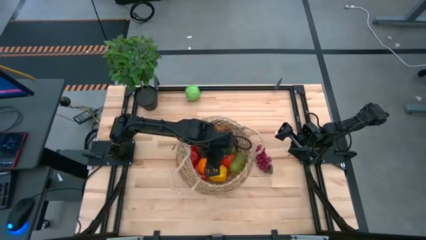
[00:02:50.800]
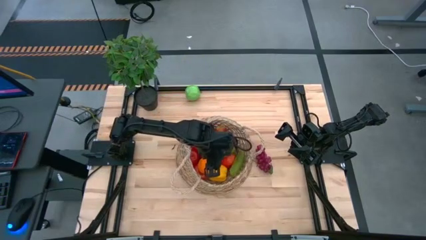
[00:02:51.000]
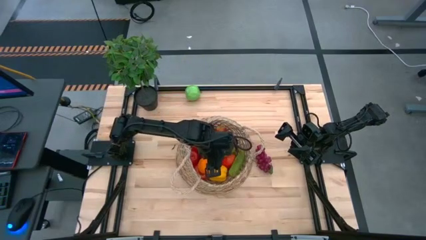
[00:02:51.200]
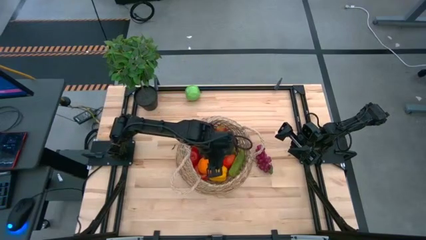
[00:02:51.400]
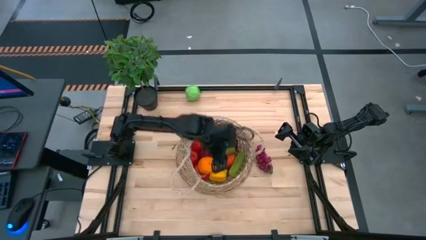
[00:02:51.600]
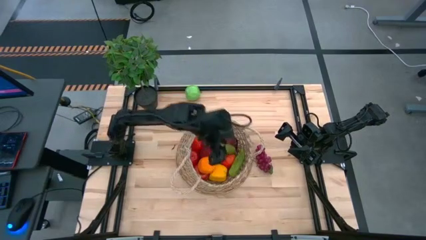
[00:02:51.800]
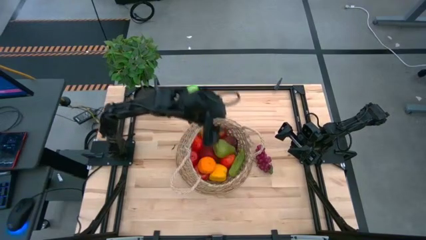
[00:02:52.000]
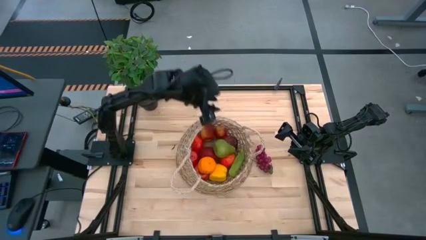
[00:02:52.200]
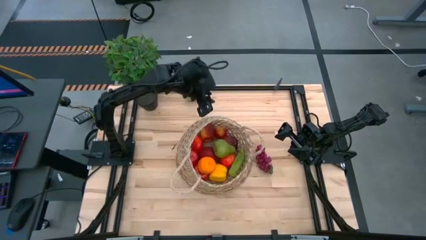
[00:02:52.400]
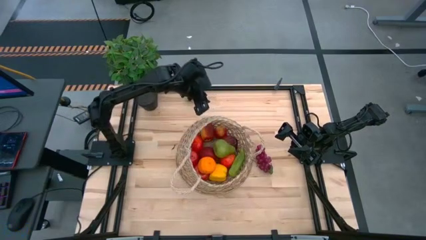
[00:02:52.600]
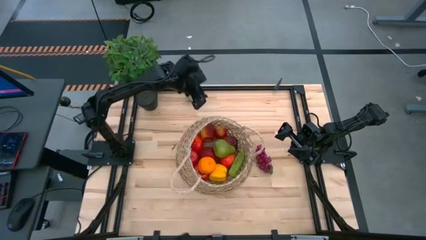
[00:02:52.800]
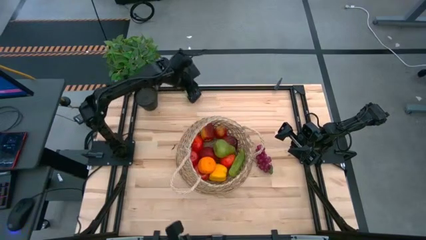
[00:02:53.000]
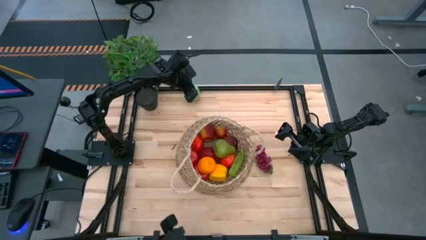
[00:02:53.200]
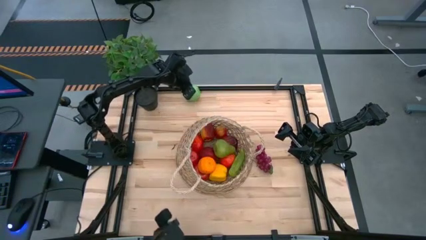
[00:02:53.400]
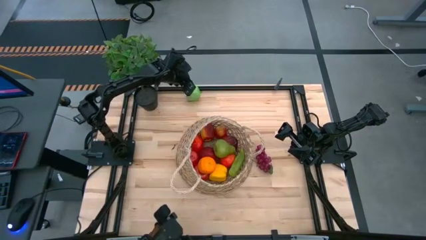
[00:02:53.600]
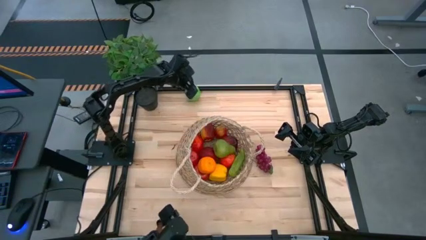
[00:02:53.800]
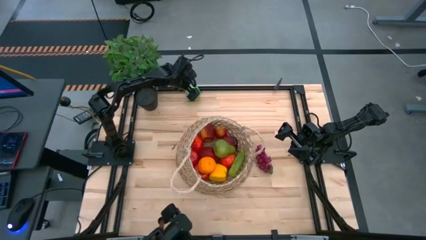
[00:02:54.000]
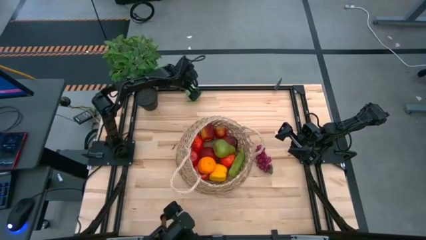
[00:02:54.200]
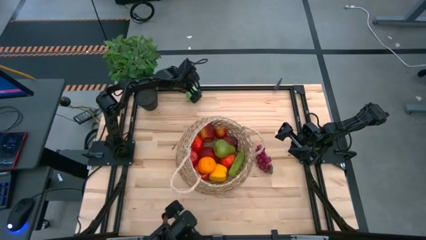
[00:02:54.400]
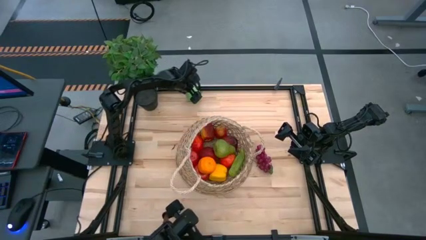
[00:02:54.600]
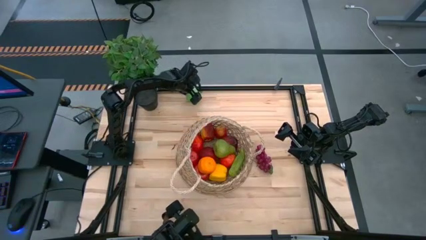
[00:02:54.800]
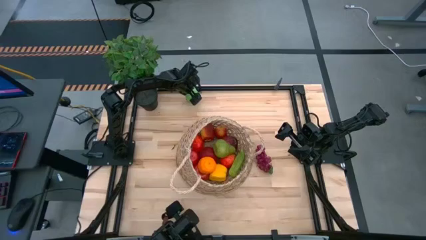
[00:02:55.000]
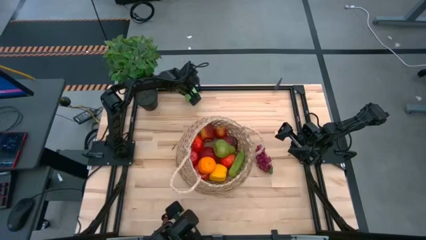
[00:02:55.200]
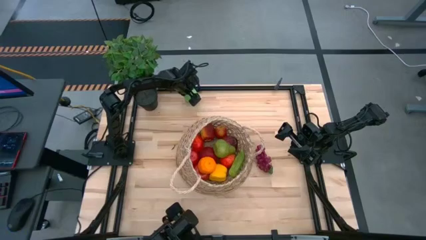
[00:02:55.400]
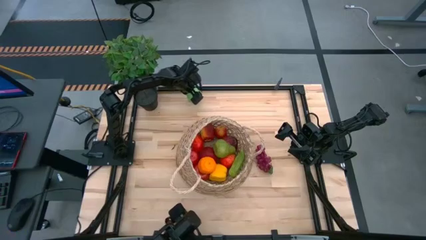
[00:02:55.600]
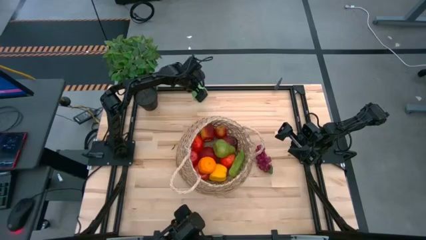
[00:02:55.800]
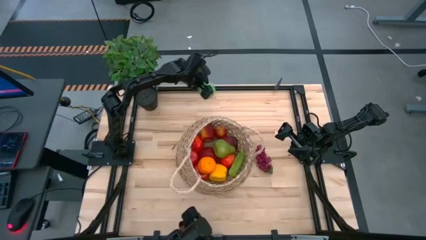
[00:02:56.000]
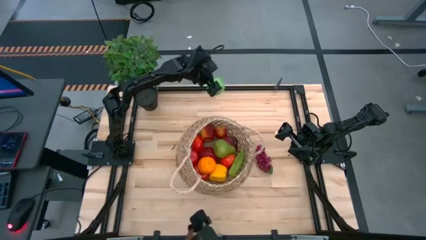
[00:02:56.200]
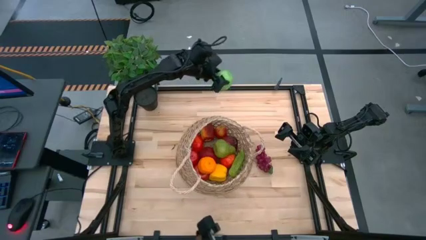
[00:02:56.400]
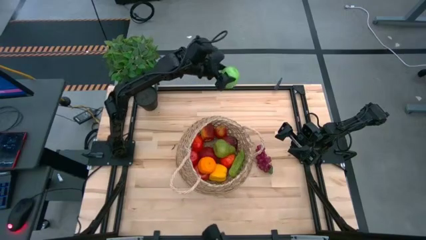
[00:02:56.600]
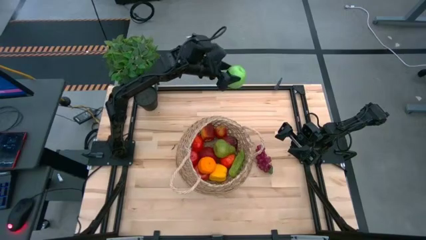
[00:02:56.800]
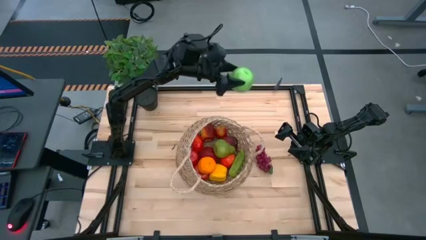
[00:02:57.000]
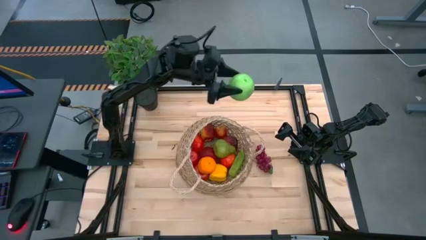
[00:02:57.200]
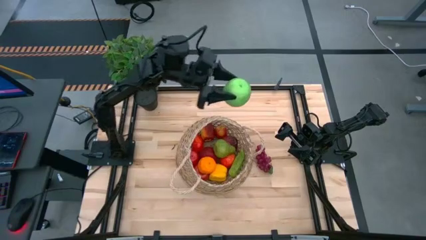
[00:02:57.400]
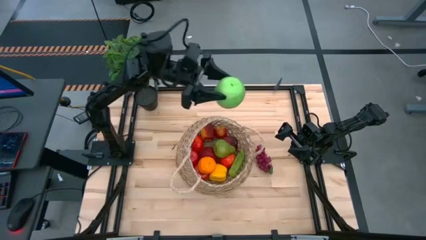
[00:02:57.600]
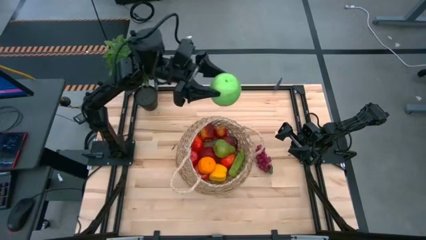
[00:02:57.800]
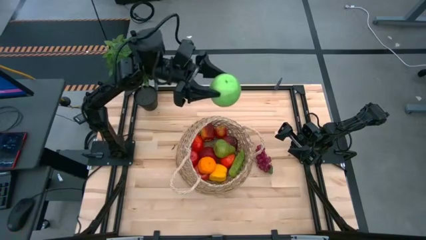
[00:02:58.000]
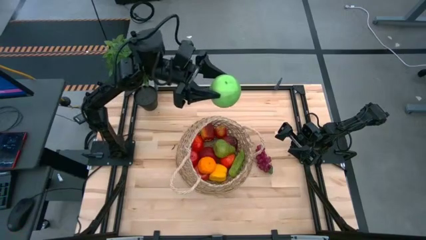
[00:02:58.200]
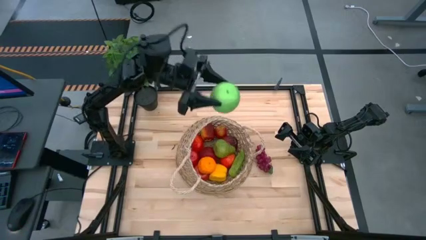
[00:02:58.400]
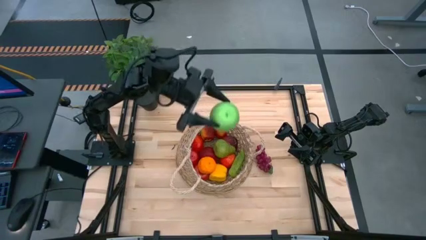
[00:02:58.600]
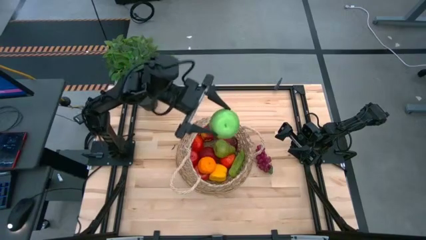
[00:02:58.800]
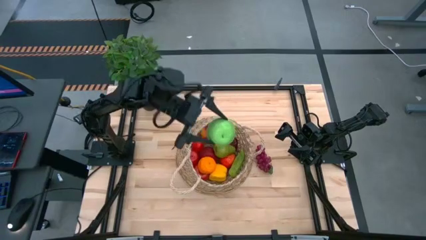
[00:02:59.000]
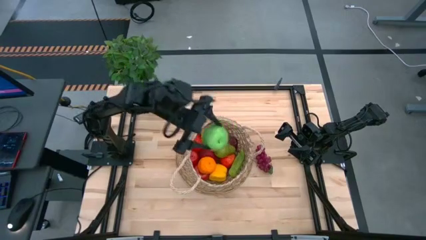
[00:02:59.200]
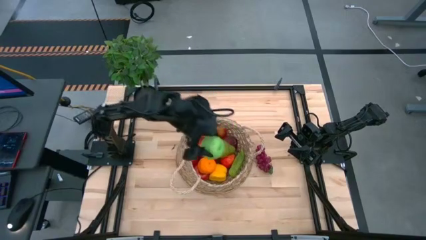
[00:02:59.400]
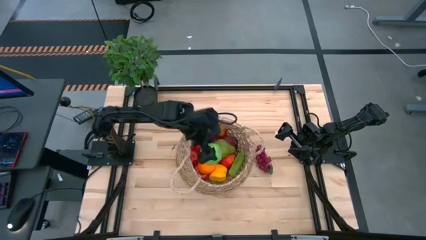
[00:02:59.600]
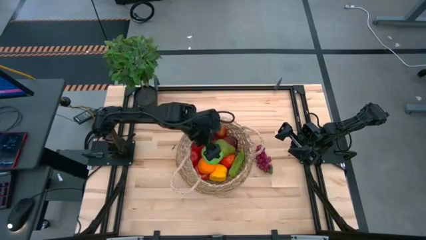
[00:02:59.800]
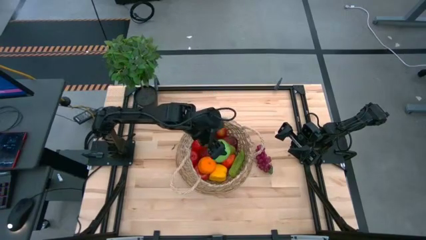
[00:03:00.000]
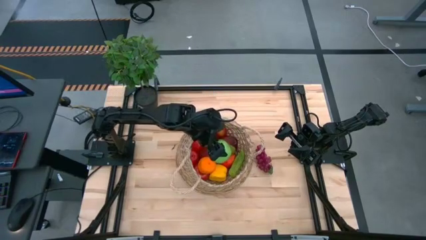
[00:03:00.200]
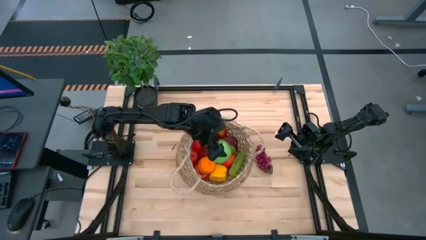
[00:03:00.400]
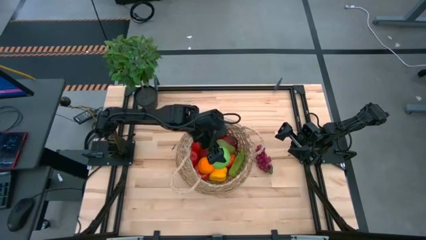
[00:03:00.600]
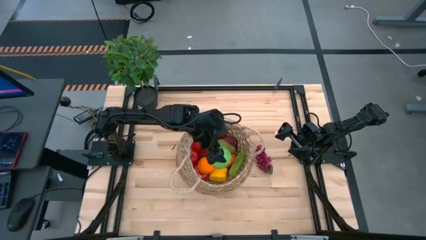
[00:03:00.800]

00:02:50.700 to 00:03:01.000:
Task: Build produce basket
Put the green apple into the woven basket

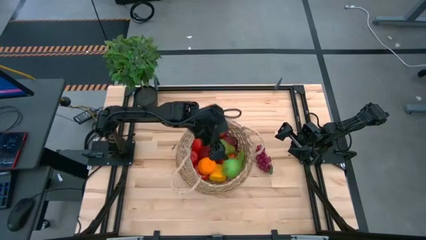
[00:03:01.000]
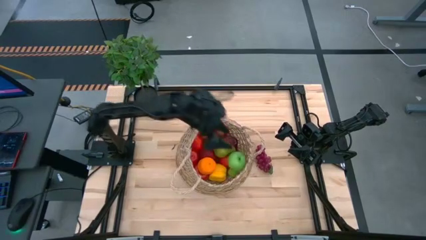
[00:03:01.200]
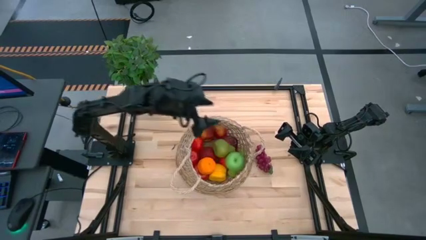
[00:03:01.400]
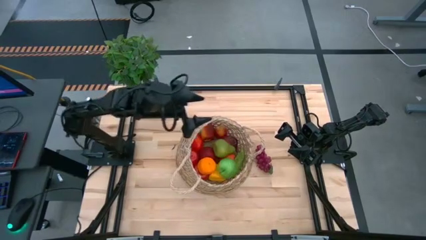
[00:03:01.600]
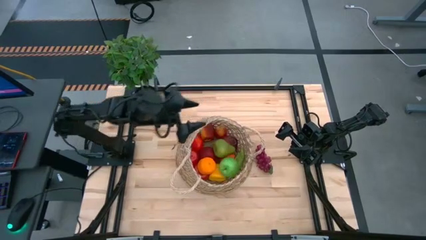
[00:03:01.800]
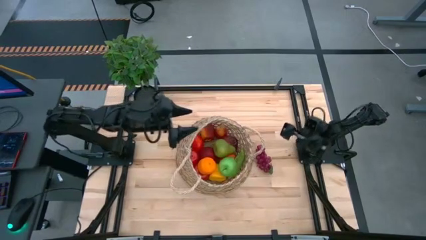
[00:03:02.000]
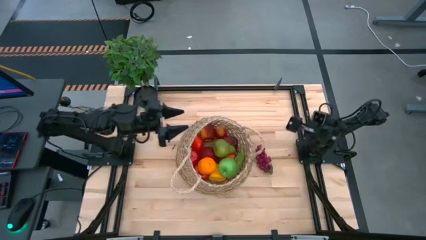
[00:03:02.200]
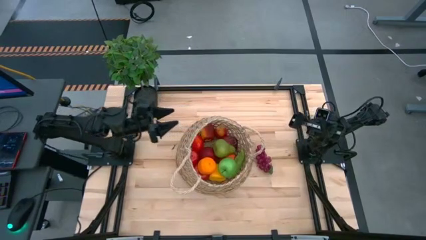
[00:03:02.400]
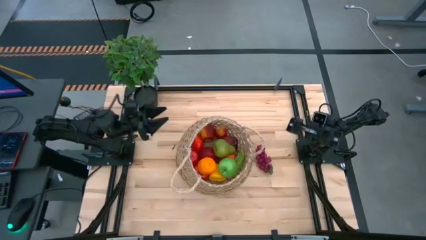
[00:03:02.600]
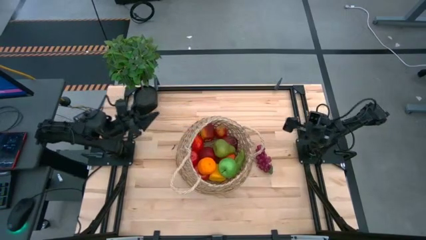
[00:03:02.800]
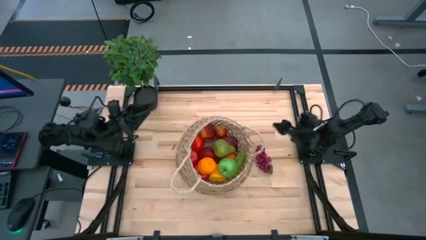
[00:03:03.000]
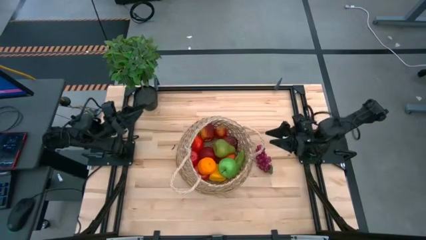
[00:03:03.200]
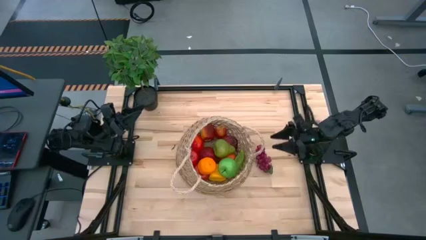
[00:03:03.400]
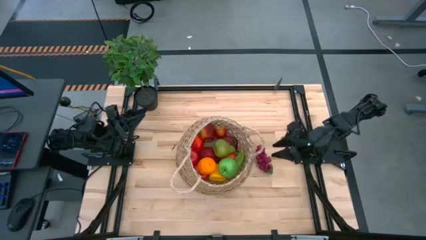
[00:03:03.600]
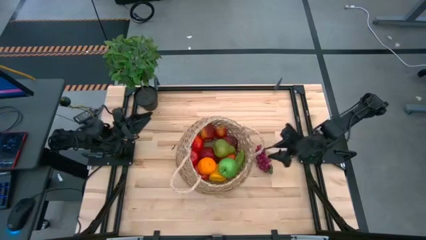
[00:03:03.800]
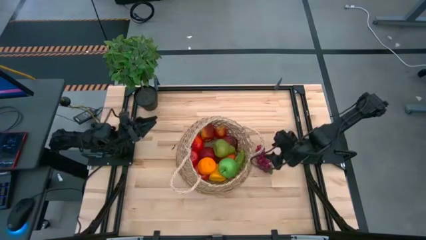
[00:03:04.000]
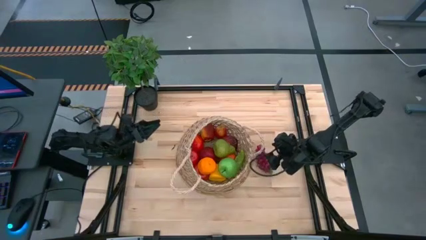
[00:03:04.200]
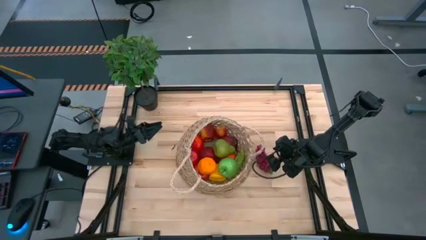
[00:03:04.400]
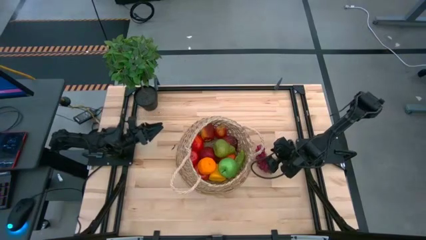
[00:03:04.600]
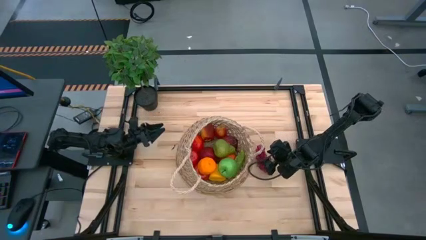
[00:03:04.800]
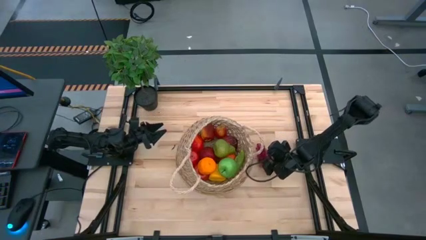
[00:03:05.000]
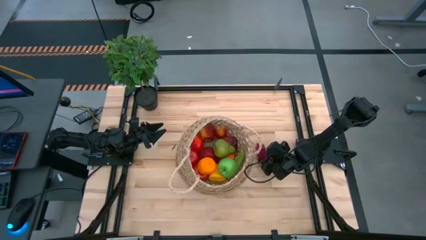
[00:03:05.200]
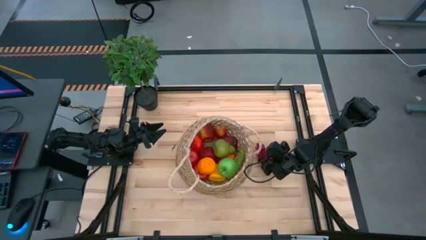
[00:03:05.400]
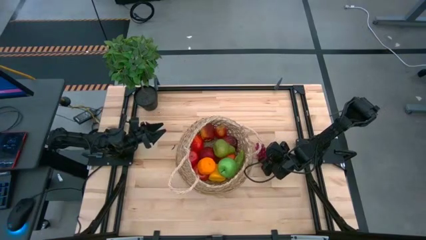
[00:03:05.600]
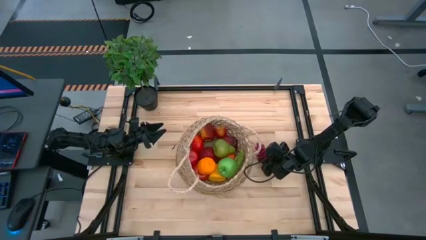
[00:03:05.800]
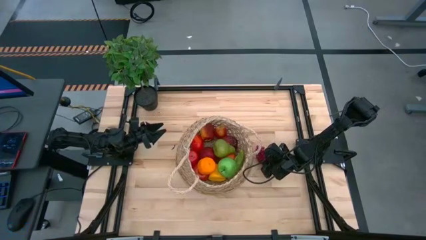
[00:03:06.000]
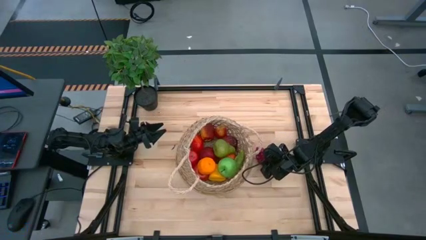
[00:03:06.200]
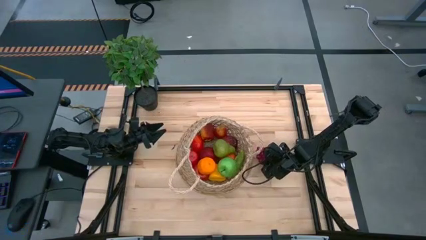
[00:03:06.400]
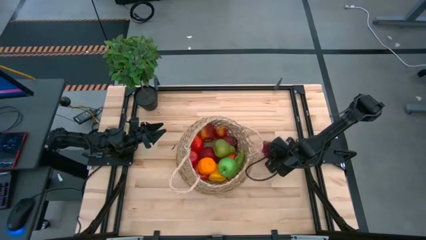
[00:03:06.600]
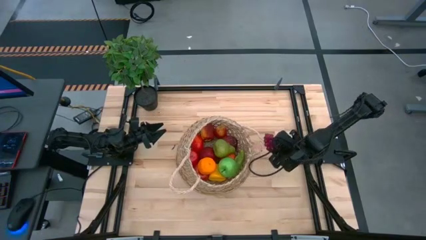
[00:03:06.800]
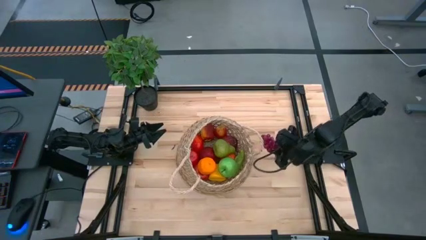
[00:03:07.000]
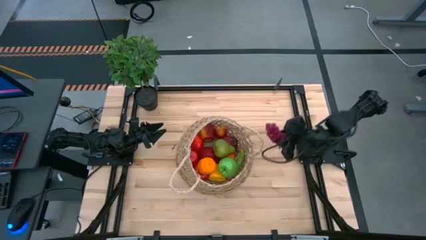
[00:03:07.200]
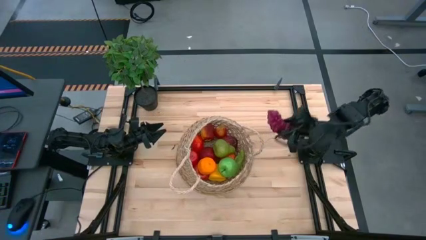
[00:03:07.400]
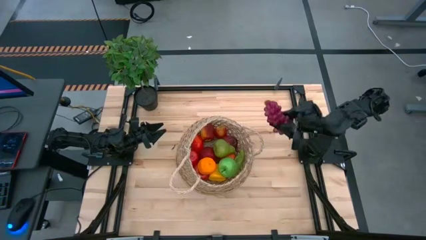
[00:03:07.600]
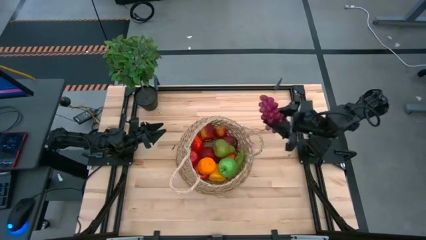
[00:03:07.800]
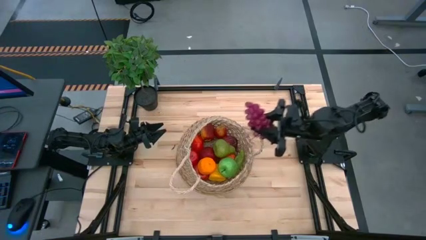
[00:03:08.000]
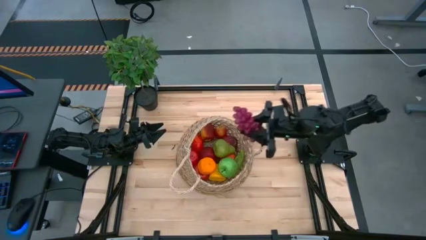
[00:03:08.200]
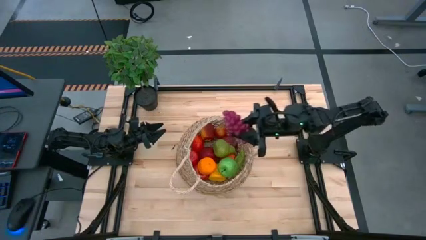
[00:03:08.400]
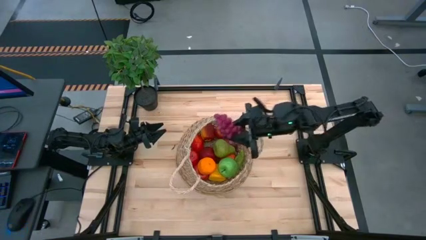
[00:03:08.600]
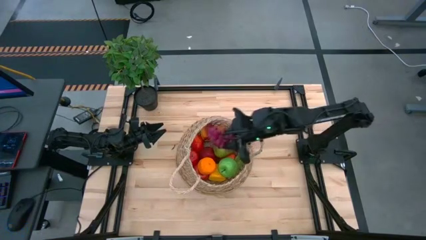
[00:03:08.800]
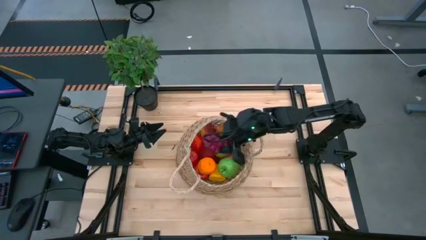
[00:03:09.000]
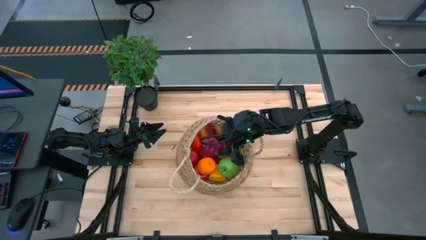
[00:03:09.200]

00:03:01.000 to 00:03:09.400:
Put the grapes into the woven basket
